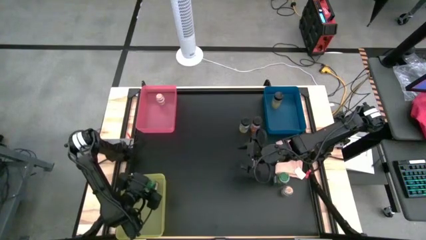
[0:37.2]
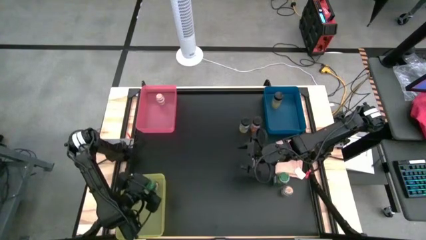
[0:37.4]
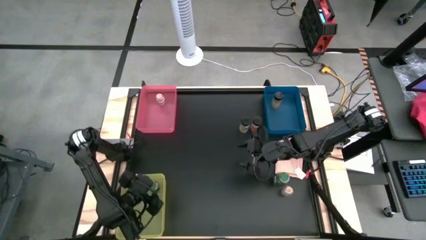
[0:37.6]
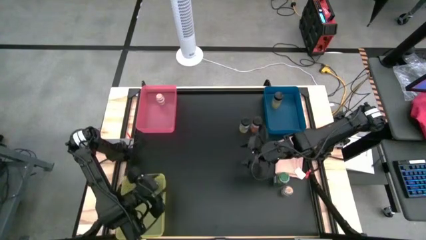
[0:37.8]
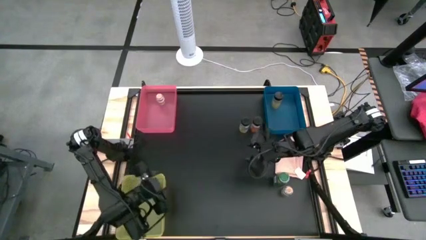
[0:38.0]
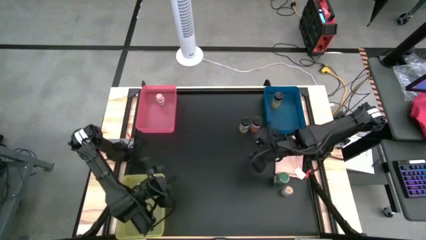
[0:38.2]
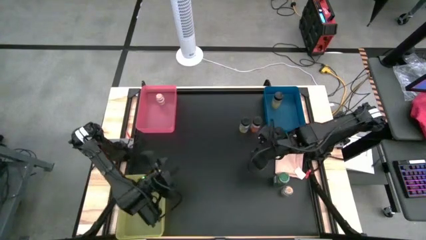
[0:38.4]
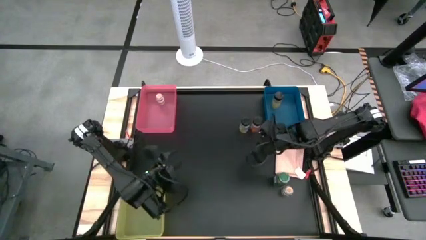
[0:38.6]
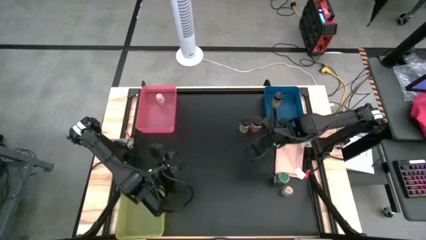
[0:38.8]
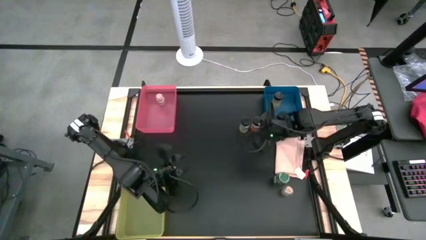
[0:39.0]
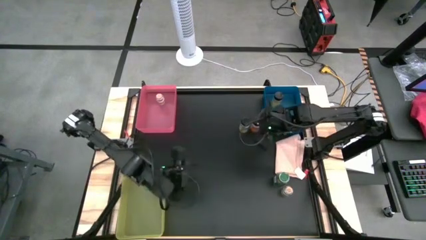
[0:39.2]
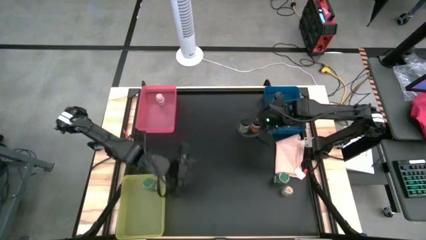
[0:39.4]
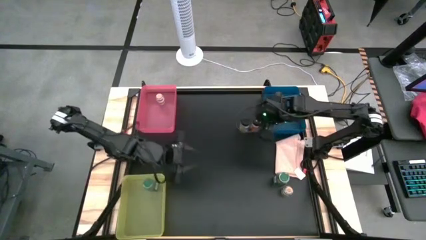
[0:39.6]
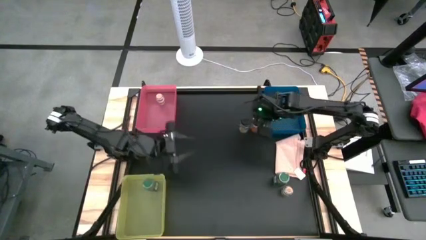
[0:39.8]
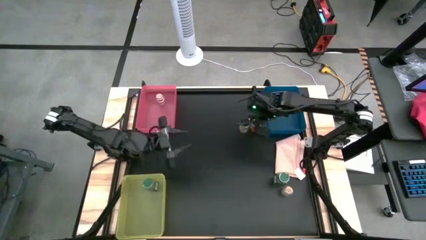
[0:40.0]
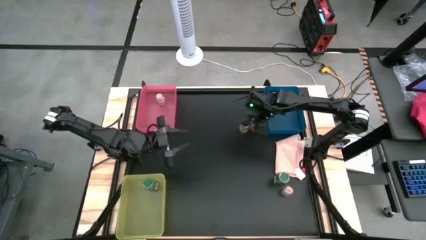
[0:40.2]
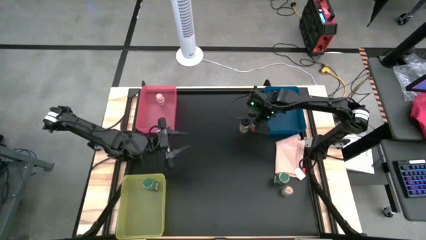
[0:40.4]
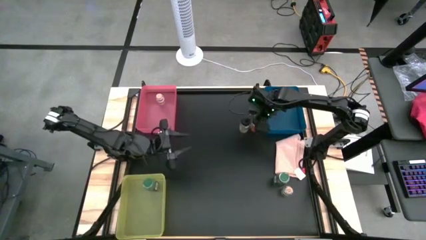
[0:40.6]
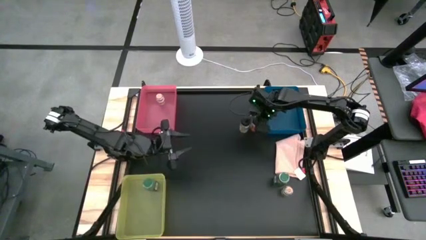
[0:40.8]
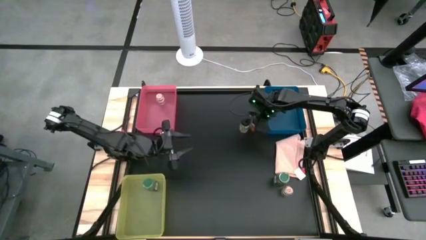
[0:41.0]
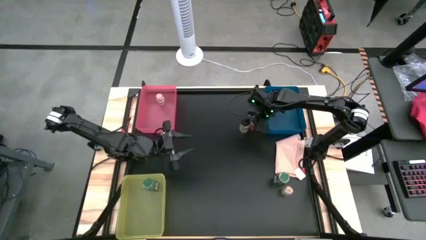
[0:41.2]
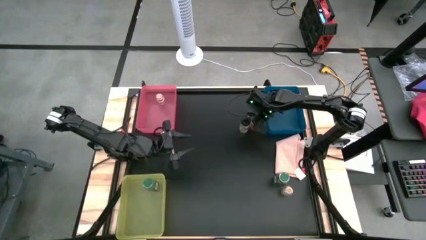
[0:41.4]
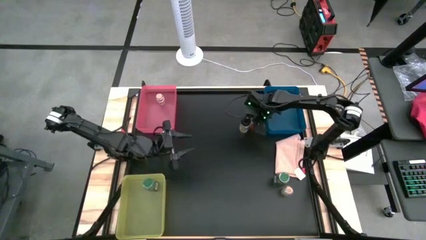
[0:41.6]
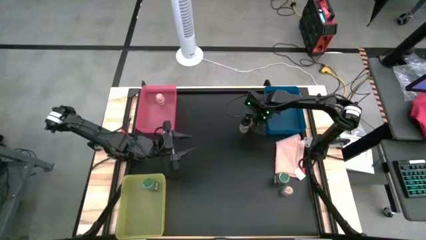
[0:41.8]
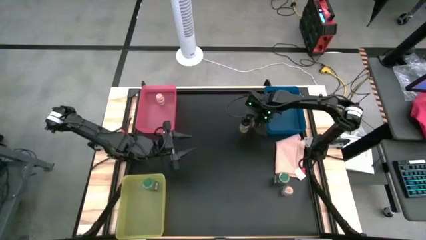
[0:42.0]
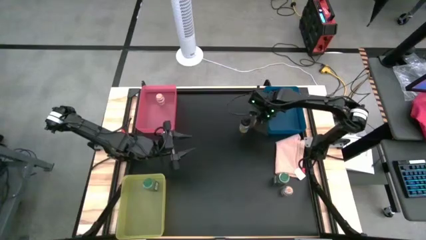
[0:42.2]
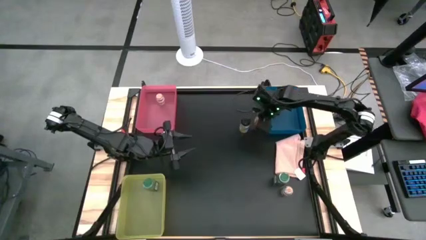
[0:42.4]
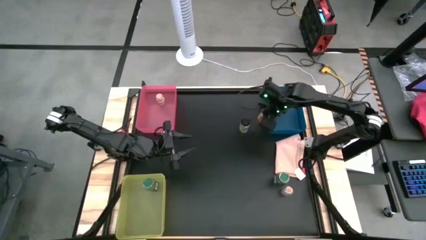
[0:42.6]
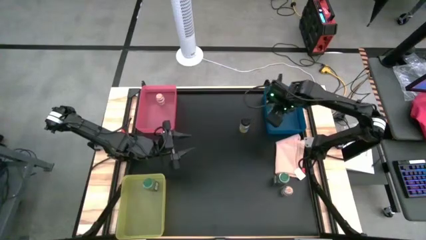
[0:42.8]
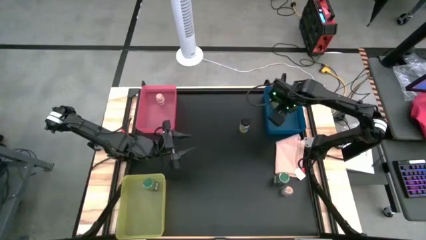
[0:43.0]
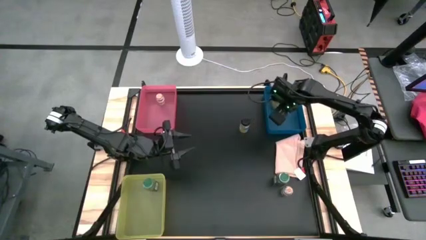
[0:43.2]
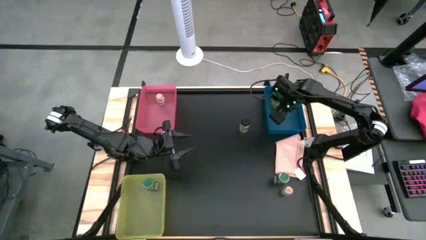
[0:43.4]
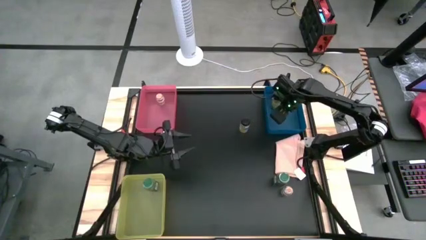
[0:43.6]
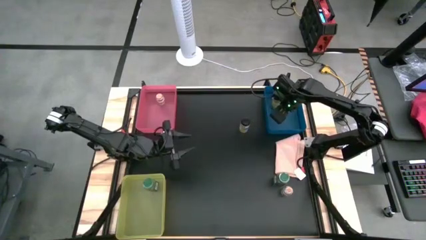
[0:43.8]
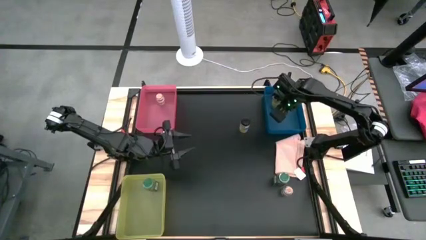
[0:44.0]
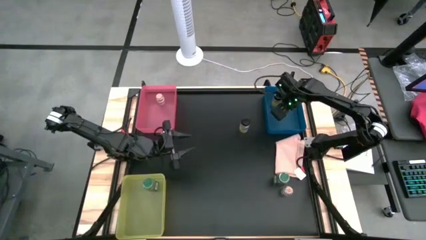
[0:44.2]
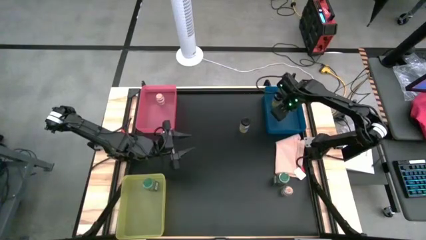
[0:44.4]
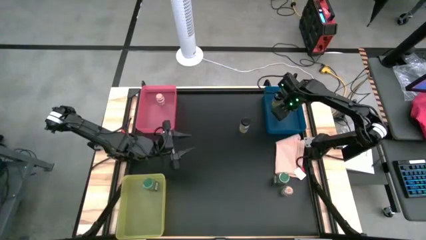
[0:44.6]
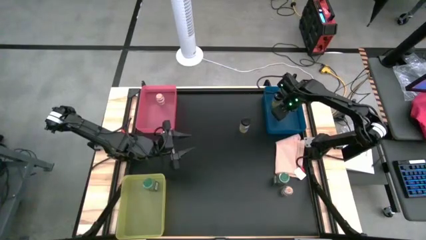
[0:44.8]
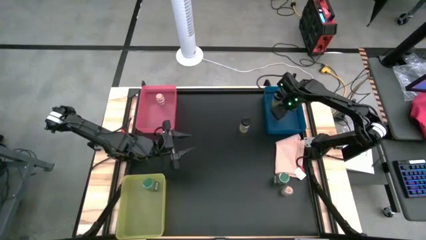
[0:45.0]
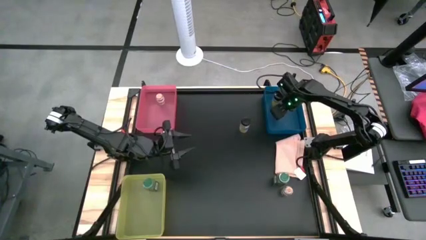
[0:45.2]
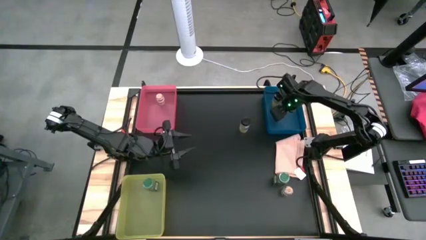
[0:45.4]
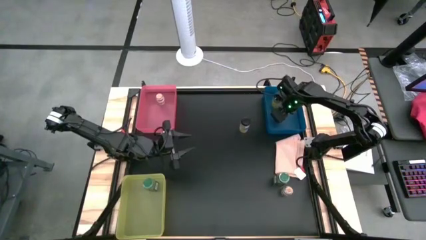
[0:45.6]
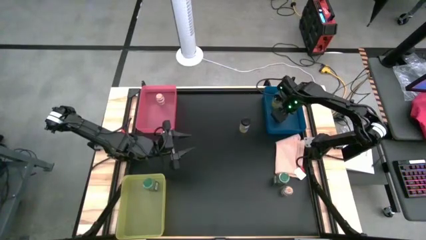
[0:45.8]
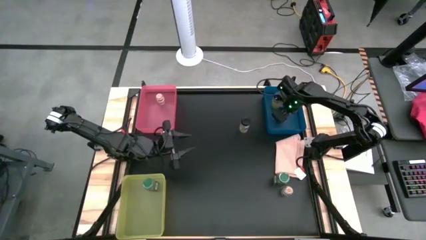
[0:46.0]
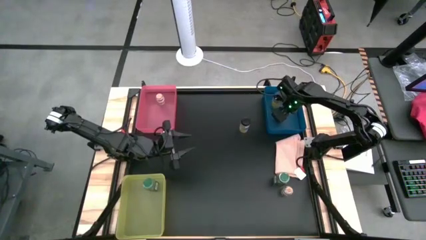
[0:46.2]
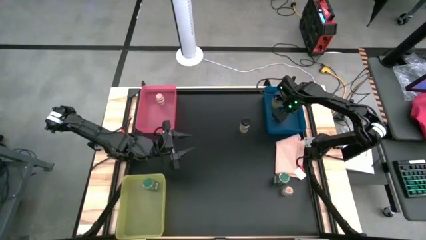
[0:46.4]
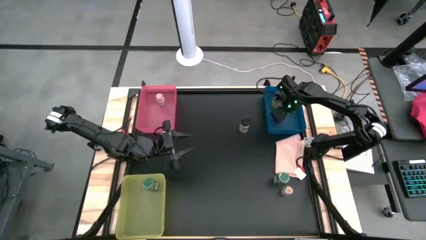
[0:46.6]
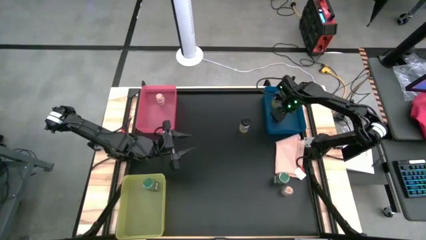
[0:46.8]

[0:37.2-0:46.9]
Task: Sort spices by type
Put the right black seasoning into the blue bin

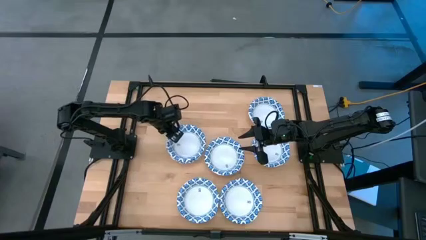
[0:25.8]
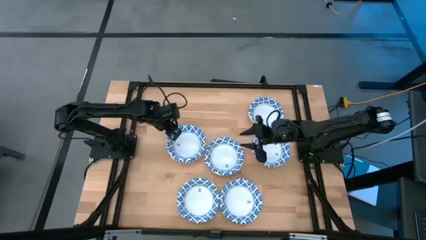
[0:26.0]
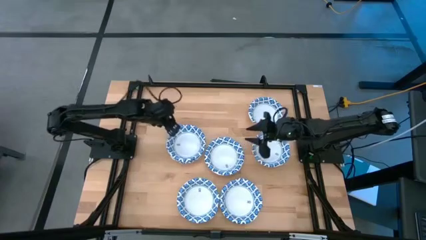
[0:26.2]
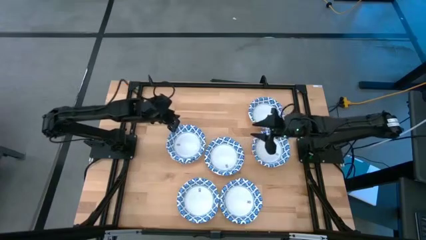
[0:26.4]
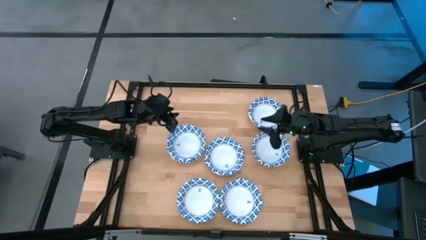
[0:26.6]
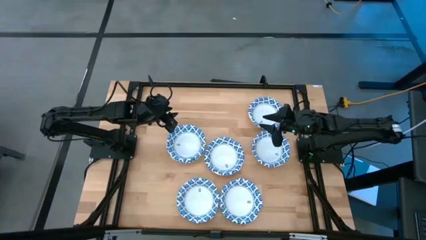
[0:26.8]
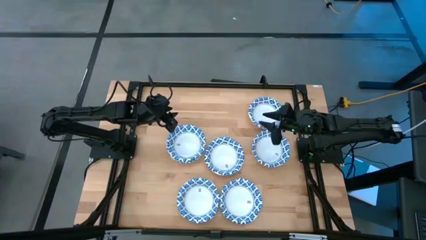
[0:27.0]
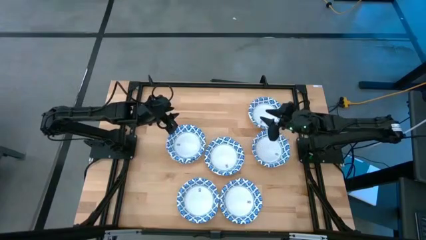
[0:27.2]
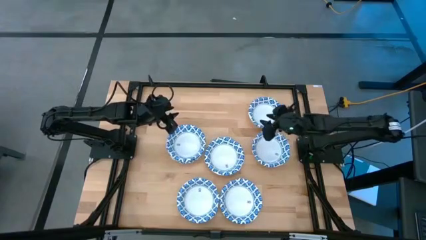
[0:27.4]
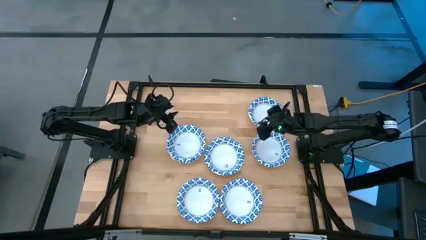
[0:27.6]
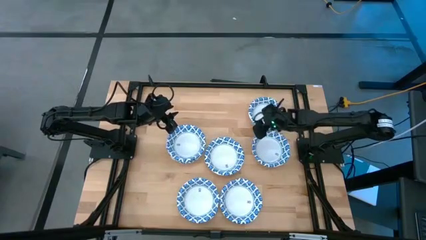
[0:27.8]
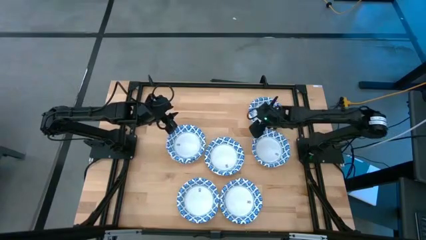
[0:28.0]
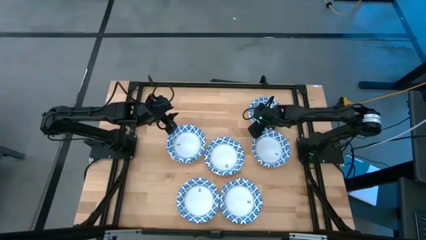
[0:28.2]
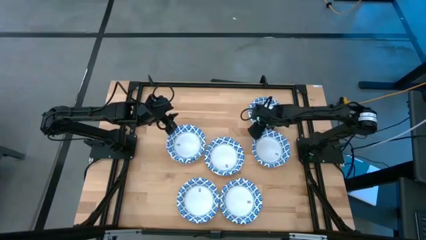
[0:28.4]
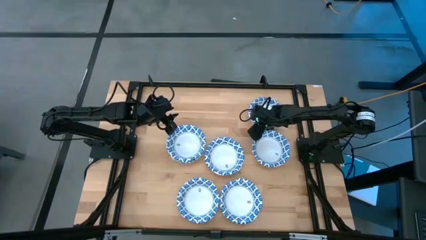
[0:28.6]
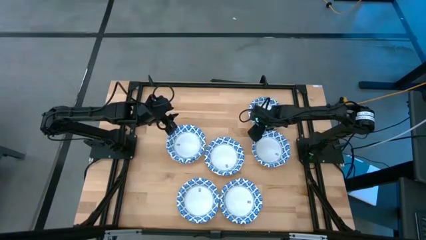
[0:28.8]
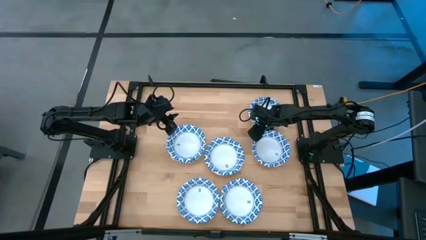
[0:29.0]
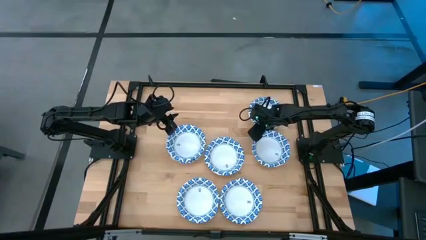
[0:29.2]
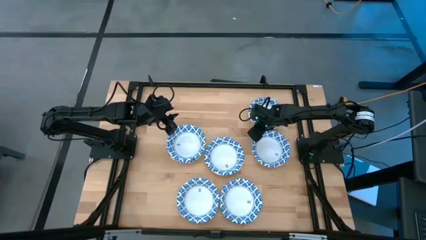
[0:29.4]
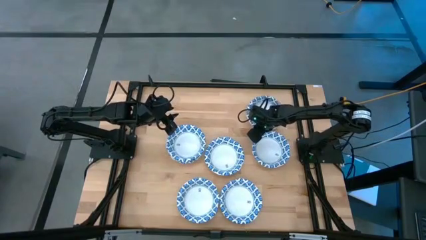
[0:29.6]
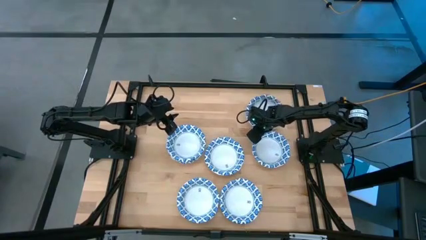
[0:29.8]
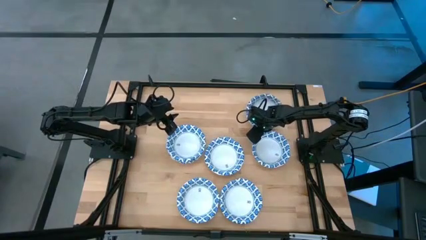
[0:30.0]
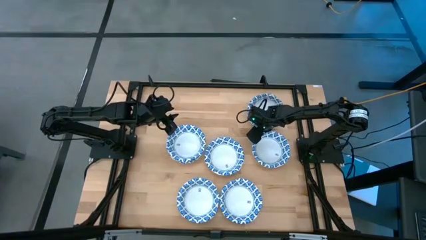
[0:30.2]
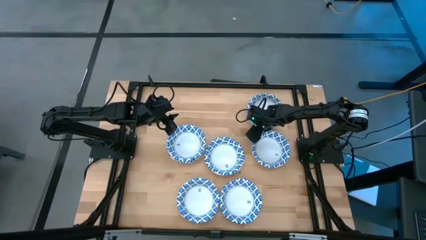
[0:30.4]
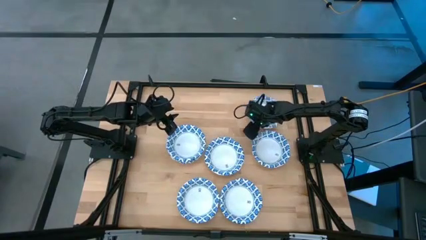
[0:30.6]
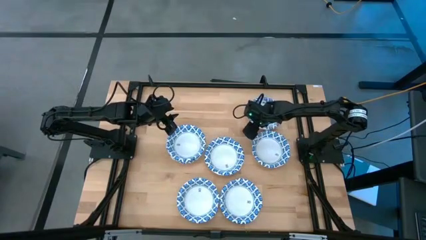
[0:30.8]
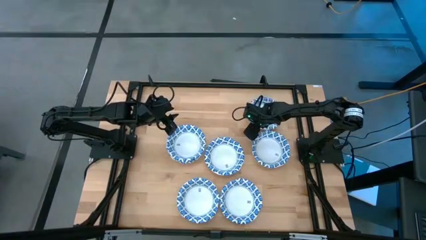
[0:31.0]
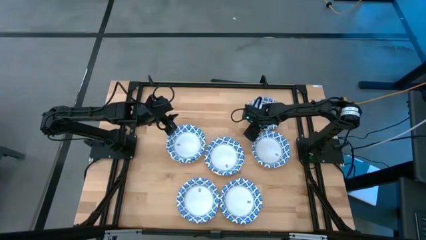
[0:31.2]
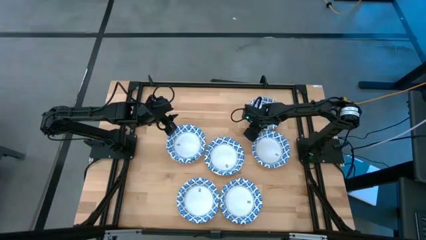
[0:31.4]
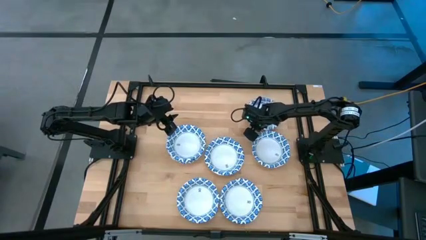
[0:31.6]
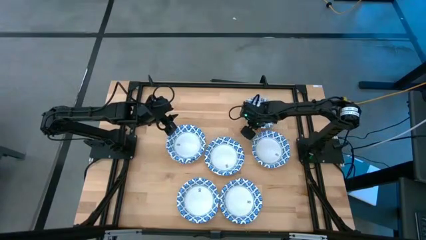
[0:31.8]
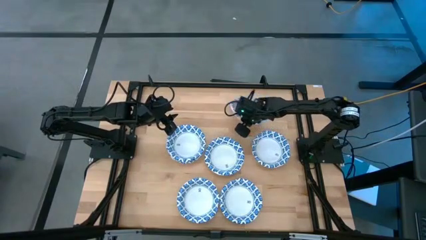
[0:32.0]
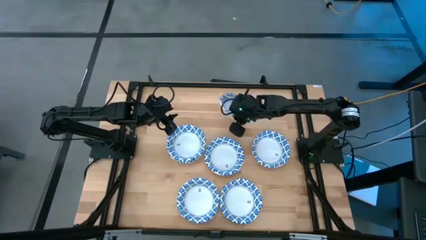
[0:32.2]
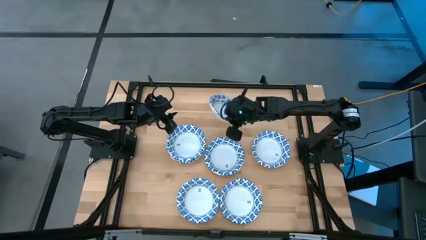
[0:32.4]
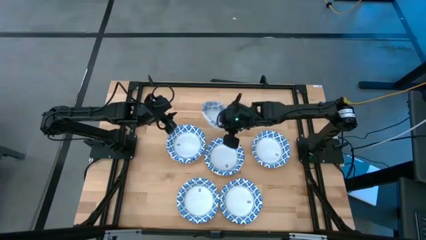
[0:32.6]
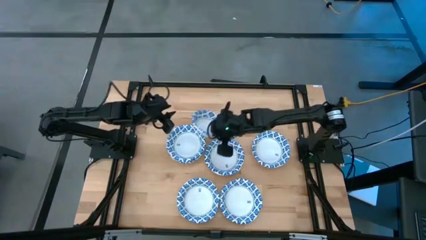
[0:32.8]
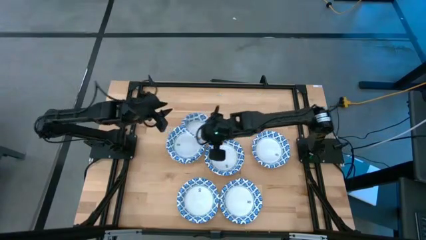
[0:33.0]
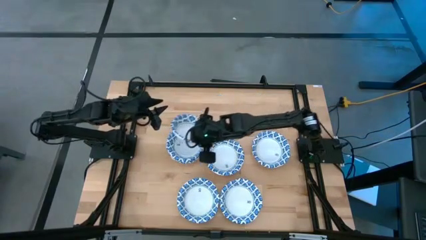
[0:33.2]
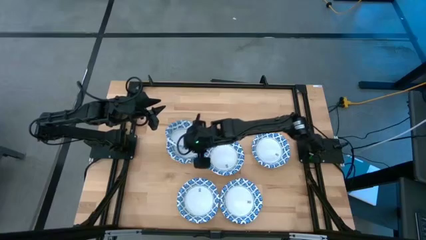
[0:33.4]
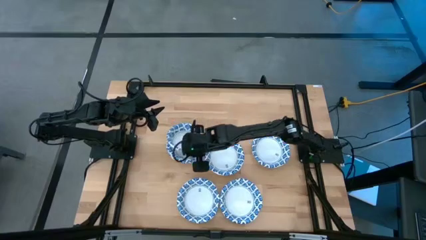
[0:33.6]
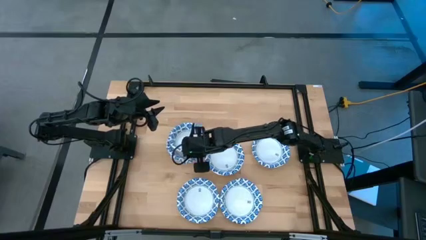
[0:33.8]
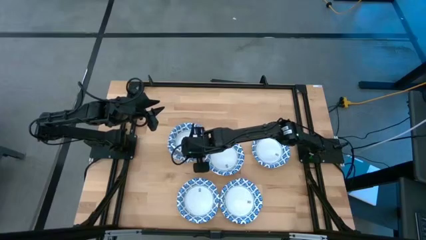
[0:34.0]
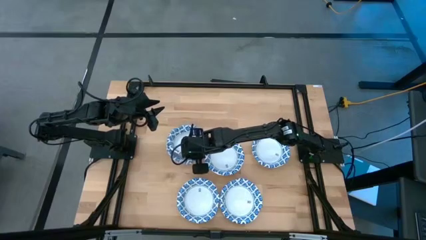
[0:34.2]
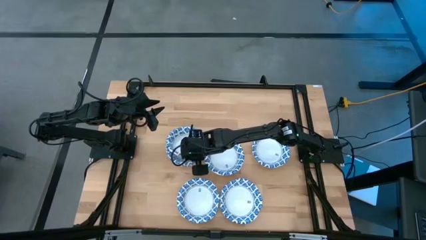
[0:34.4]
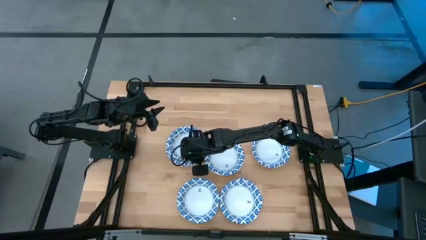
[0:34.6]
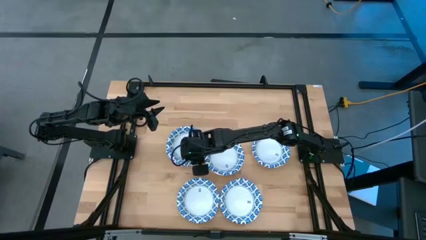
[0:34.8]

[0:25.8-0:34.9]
Task: Nest bowls inside each other
Stack the white bowl on the white bowl
